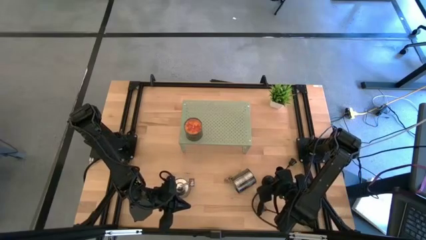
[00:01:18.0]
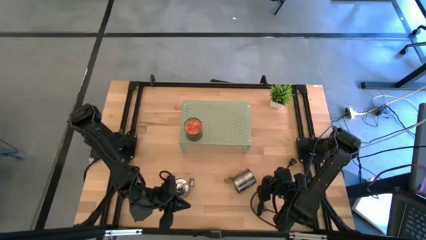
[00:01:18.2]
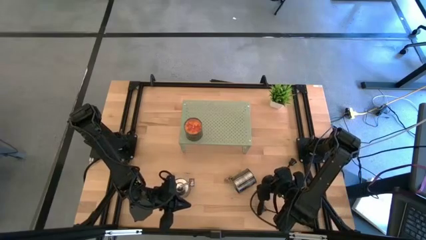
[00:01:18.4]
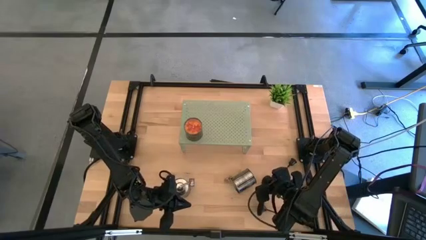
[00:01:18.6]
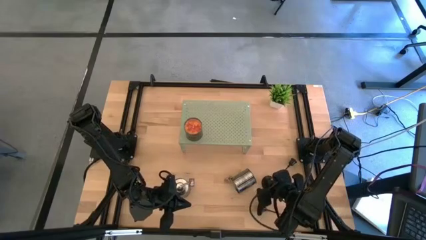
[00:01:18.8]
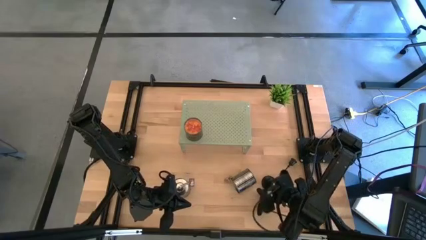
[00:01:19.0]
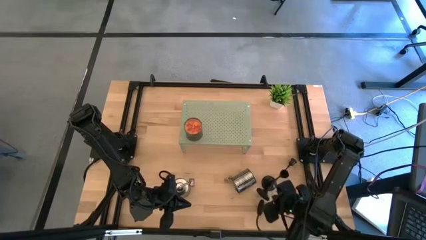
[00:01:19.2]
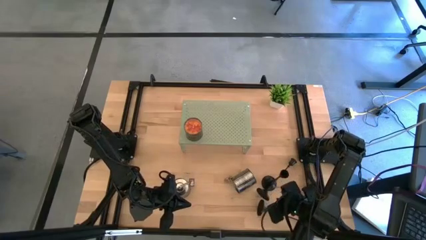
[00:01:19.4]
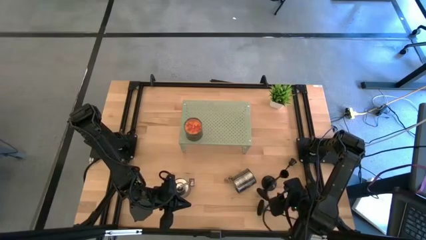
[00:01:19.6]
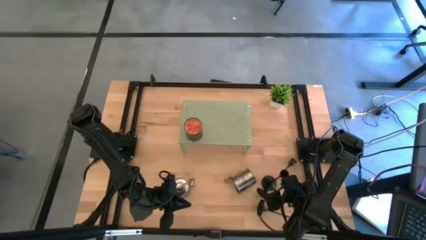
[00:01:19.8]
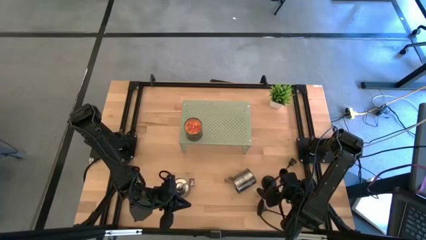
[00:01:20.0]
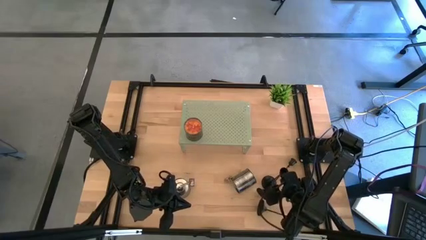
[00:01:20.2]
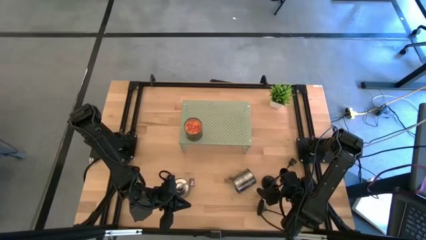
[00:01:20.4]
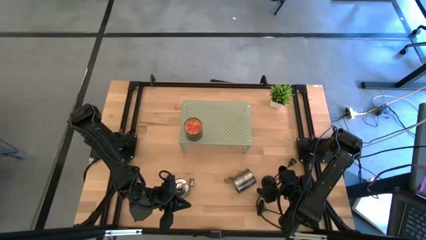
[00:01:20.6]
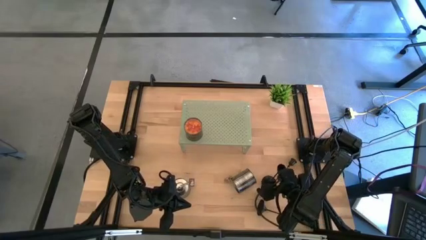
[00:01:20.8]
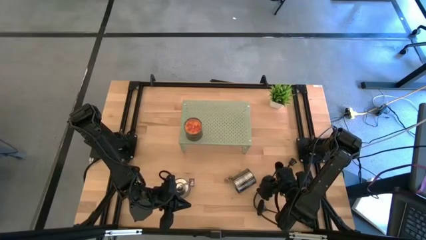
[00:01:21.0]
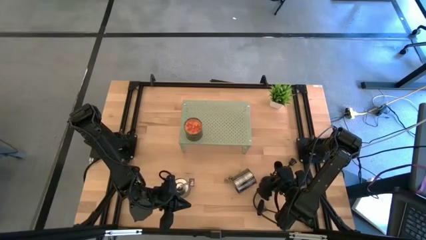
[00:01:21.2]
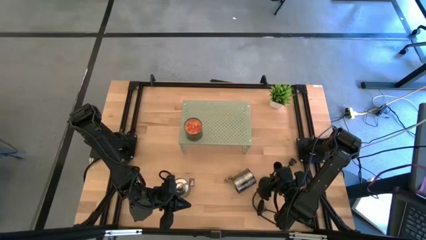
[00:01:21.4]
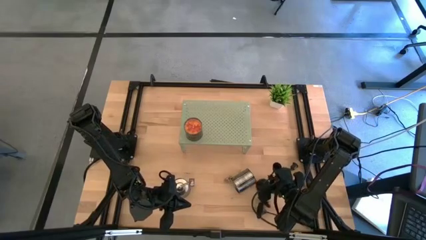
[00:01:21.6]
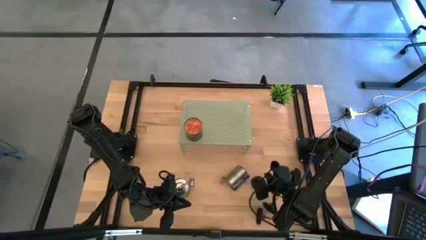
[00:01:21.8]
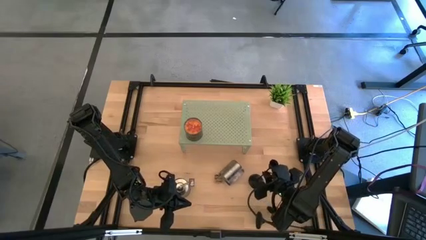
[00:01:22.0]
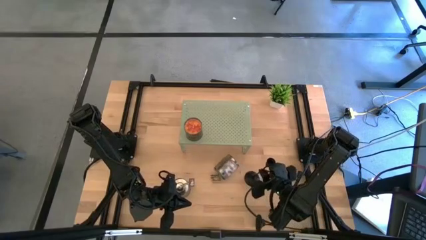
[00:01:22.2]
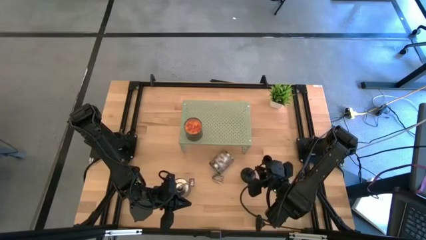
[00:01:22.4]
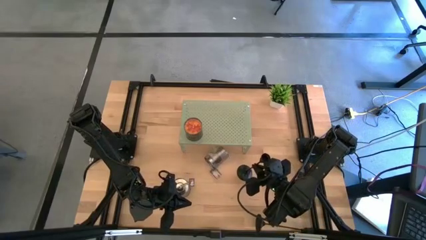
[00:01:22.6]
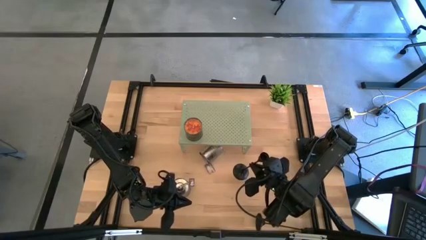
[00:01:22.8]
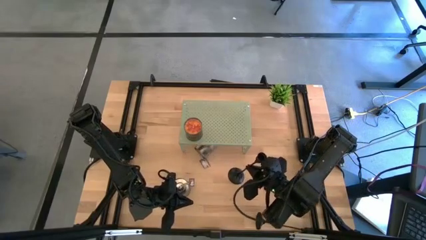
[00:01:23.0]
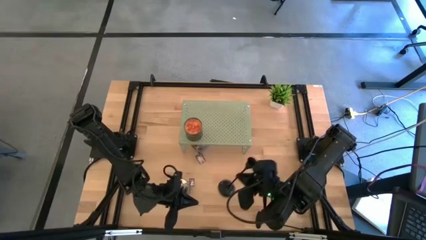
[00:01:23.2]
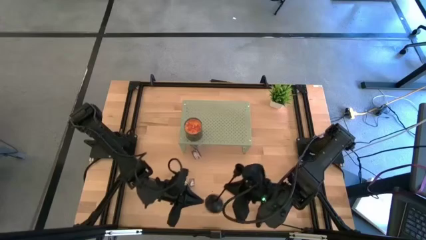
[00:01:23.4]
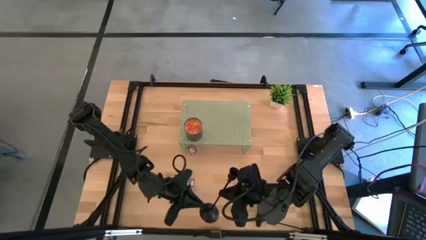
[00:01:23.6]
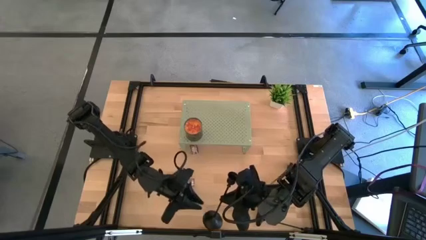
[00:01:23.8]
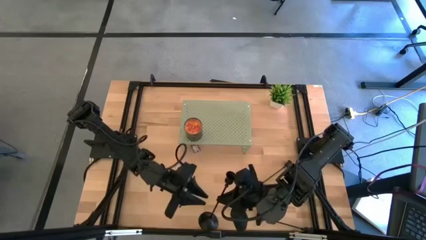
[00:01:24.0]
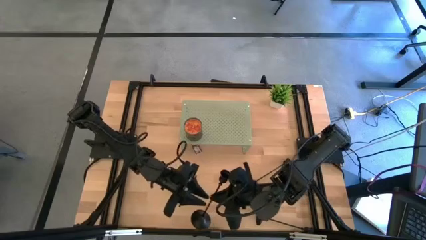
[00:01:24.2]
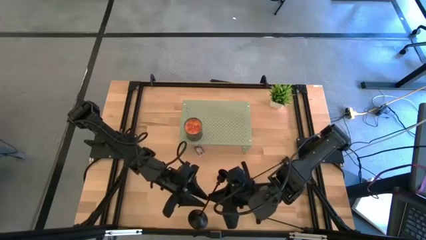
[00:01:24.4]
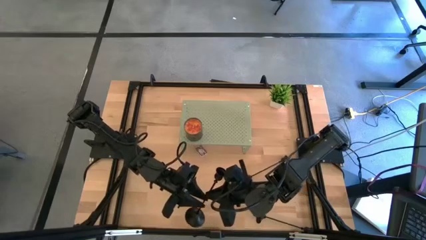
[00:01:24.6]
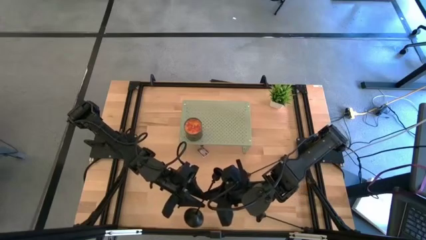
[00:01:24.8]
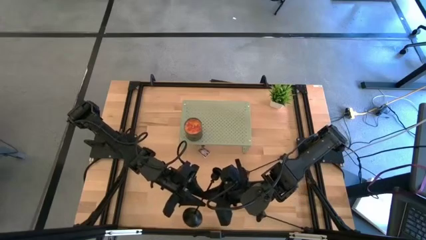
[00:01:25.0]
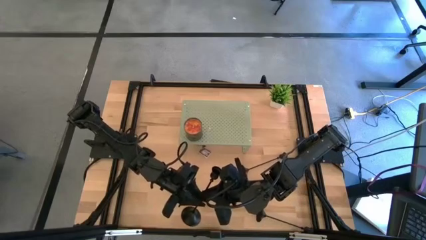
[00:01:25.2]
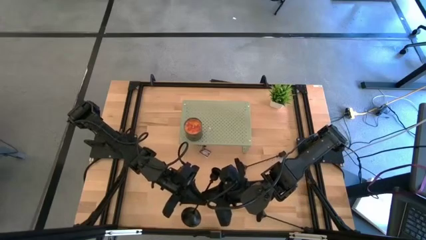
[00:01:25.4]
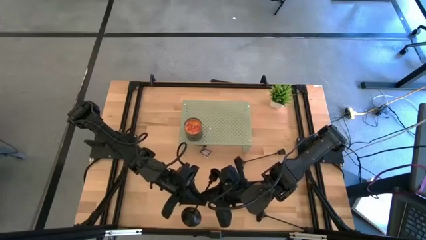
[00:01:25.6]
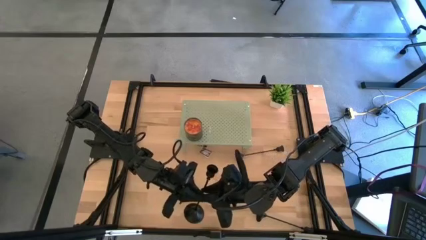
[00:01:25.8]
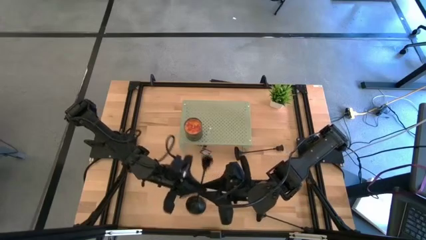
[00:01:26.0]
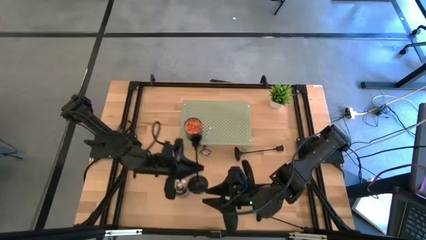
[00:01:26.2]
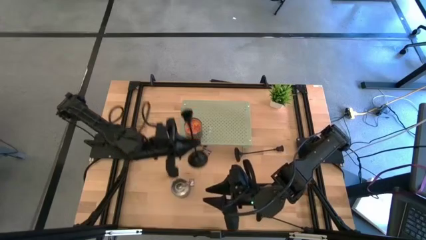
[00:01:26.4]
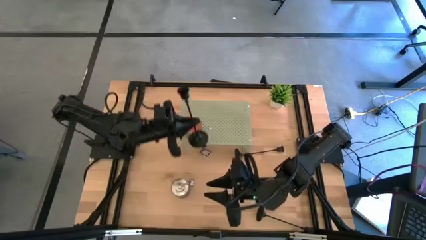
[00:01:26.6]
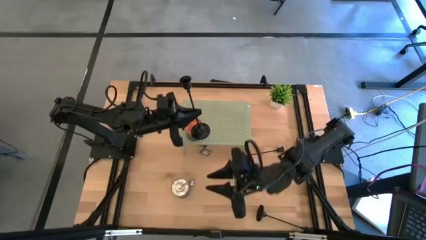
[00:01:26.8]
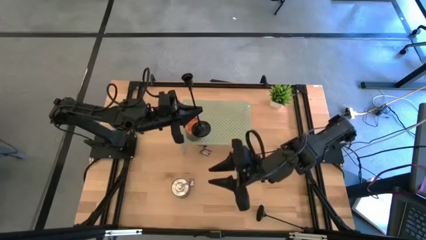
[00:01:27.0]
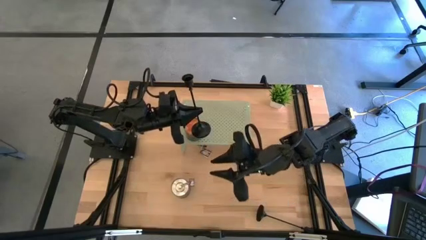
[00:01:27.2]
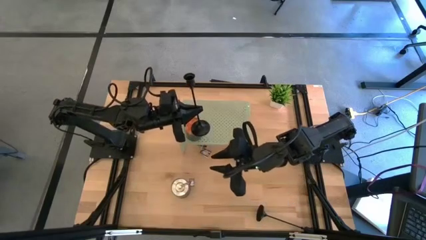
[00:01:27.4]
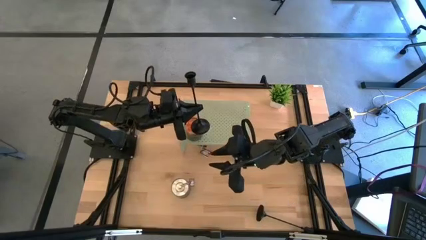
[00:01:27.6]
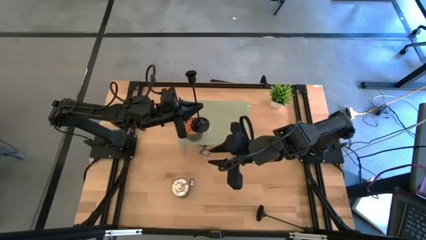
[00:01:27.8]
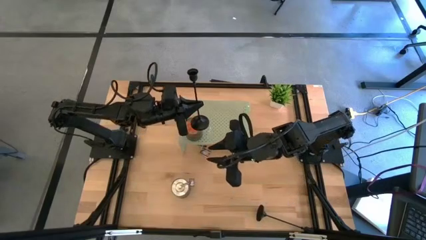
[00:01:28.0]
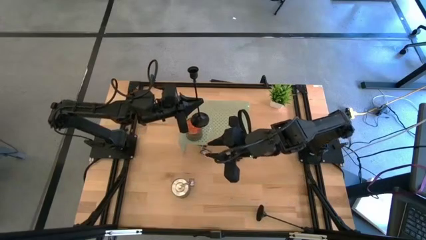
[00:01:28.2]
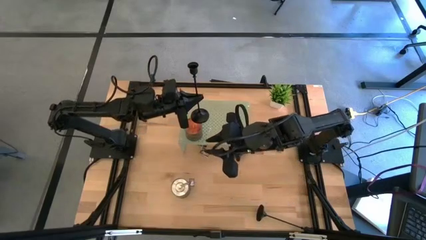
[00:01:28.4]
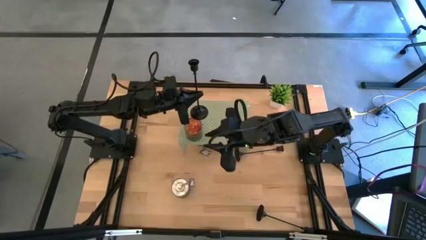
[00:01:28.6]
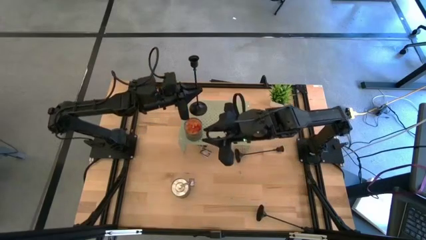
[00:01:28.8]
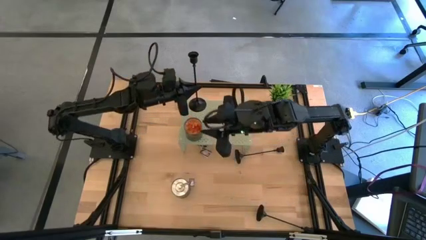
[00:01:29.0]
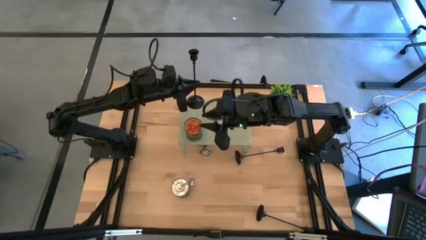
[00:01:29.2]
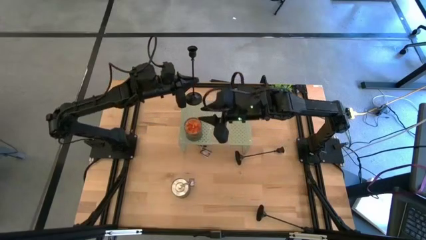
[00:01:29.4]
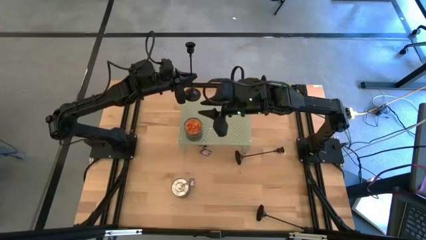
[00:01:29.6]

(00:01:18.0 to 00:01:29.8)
Task: Pick & Place candle stick holders
Put the top candle holder on the shelf

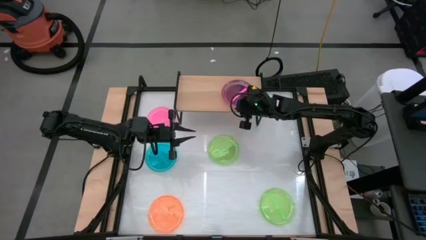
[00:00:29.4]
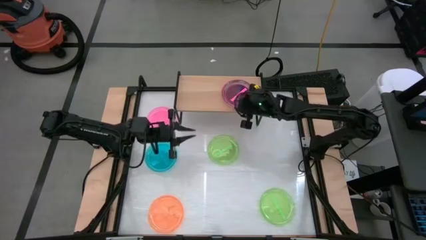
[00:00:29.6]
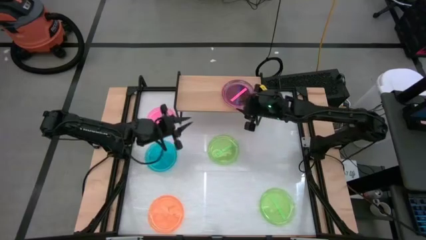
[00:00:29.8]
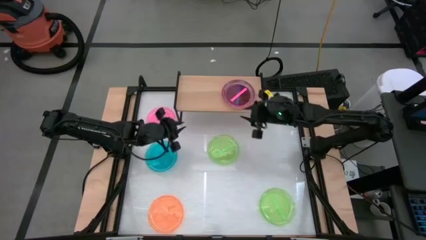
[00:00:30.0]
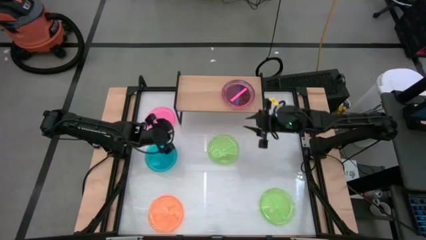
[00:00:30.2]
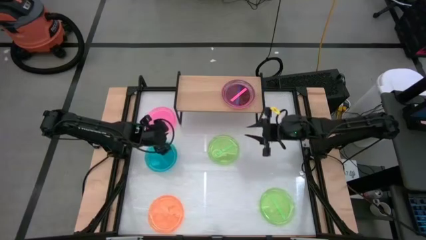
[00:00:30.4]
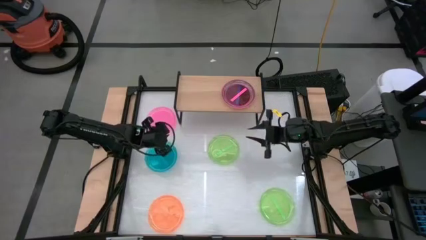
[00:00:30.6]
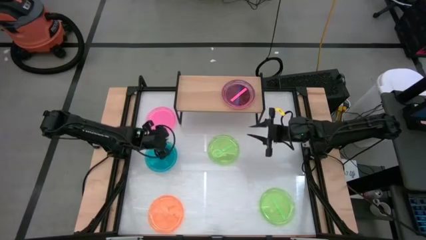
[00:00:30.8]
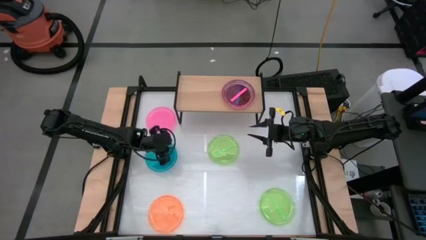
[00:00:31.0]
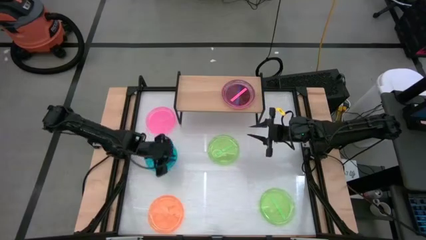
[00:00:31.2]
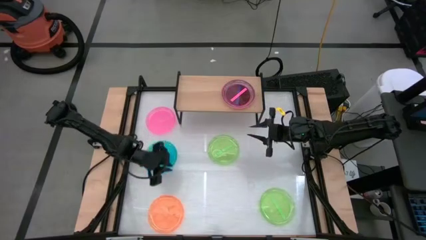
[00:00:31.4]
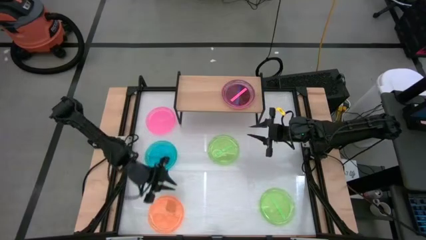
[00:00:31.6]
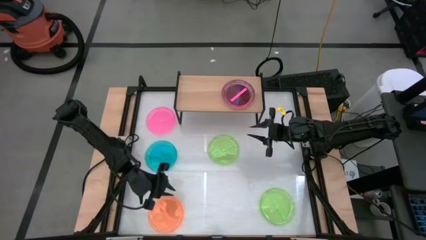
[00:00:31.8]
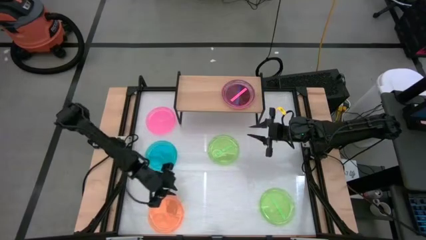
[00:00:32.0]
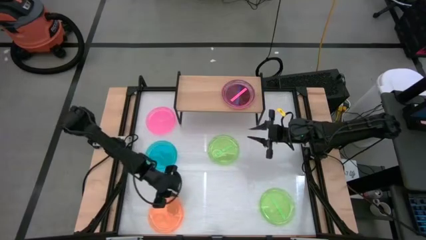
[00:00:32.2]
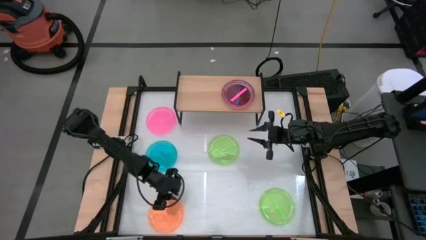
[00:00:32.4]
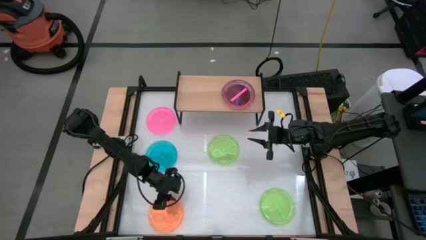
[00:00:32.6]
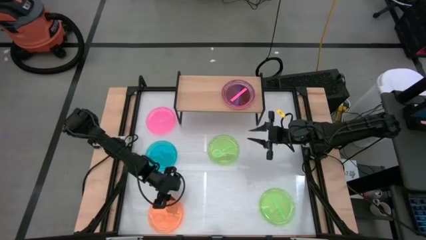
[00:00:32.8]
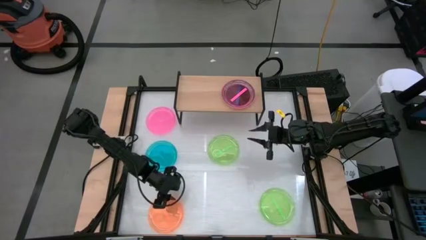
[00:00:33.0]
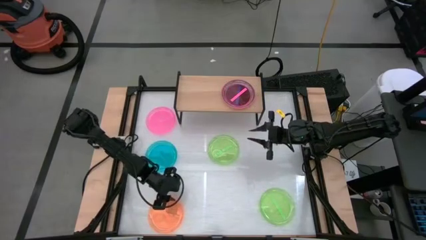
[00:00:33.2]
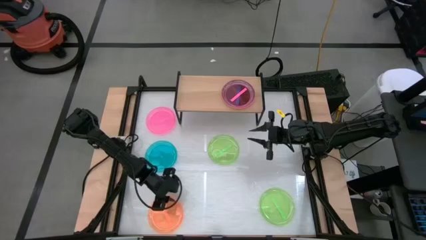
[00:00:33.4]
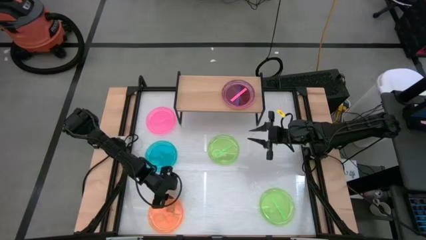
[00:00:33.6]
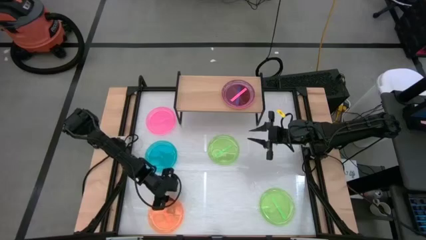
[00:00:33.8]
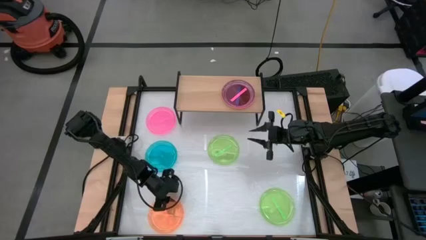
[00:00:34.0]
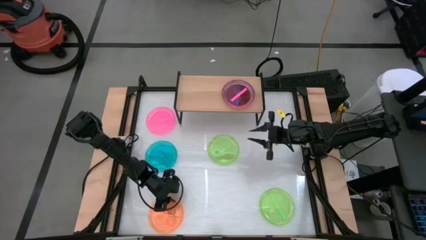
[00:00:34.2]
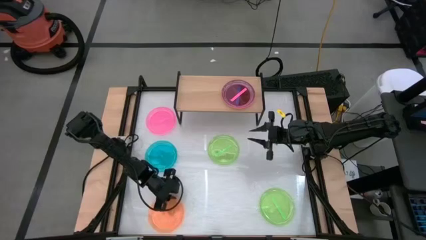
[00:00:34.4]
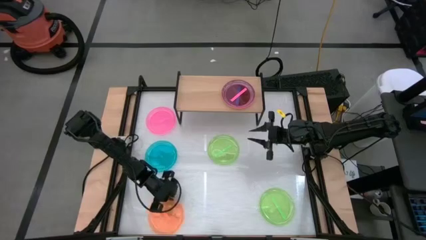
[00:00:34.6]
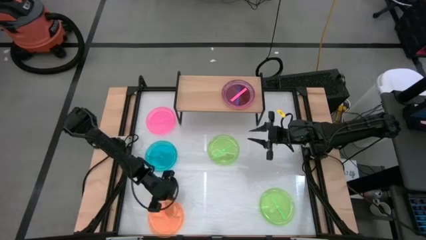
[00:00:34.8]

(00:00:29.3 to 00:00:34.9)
Task: Place and stack plates onto a shelf
Stack the orange plate on top of the pink plate on the shelf
